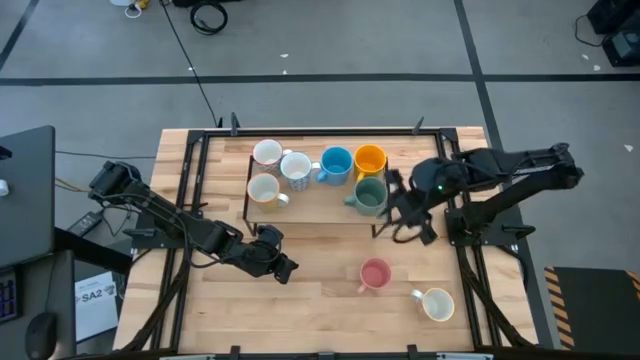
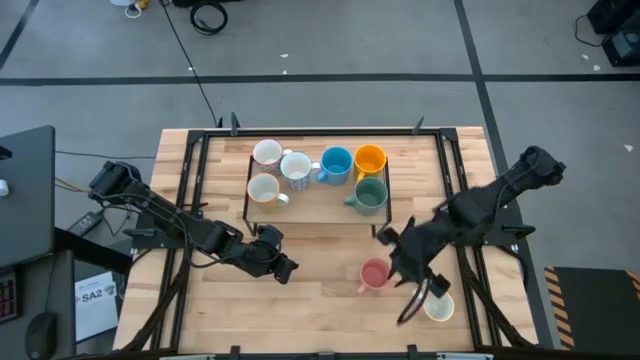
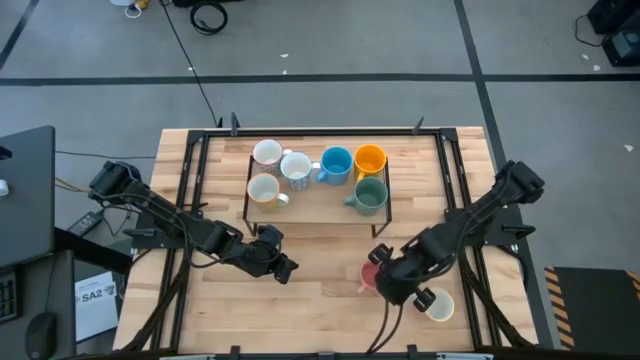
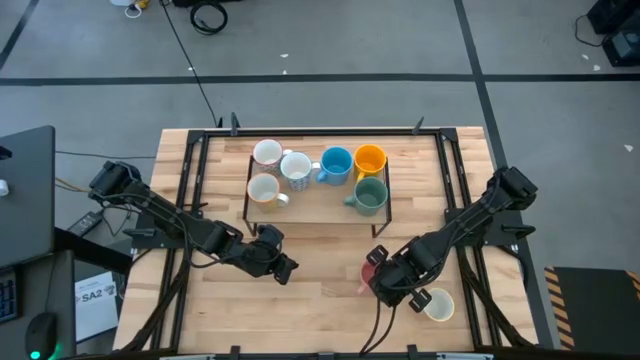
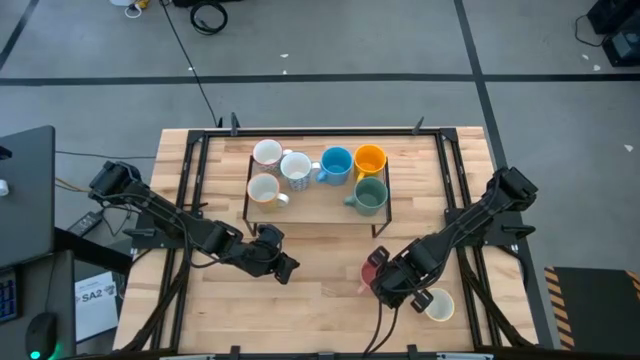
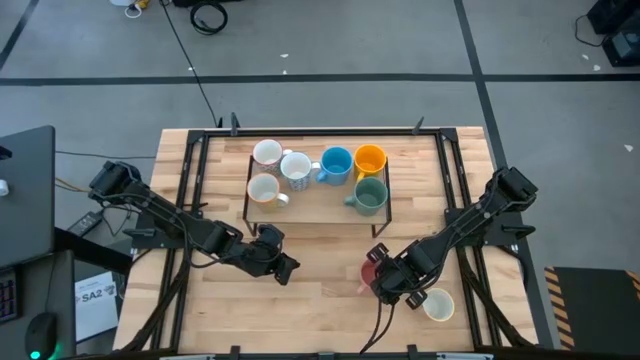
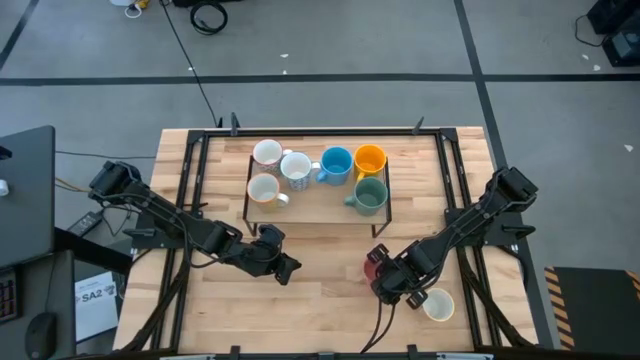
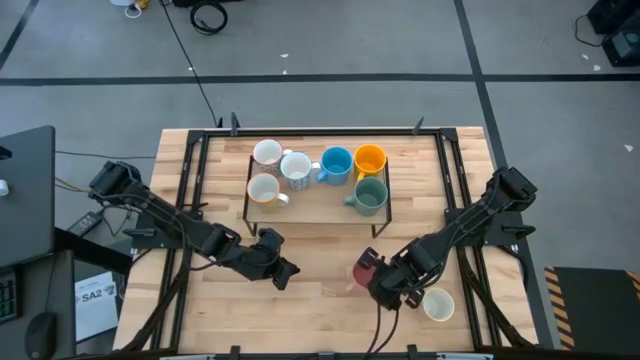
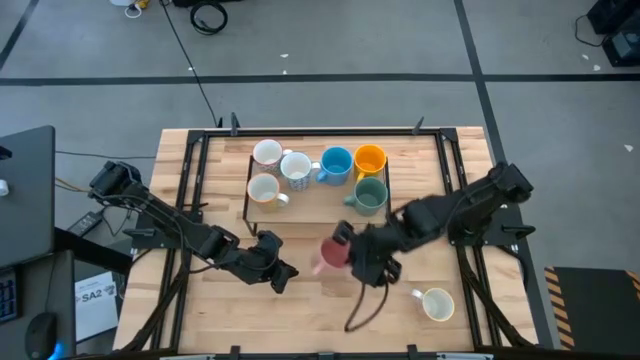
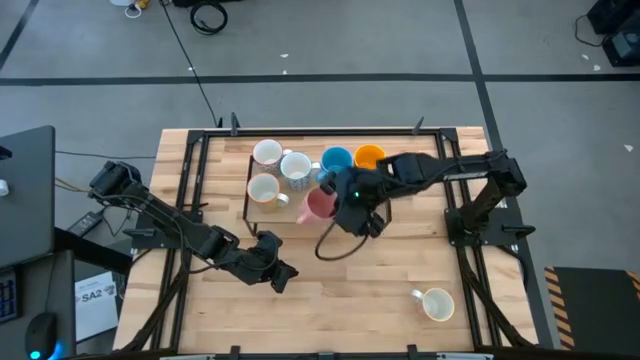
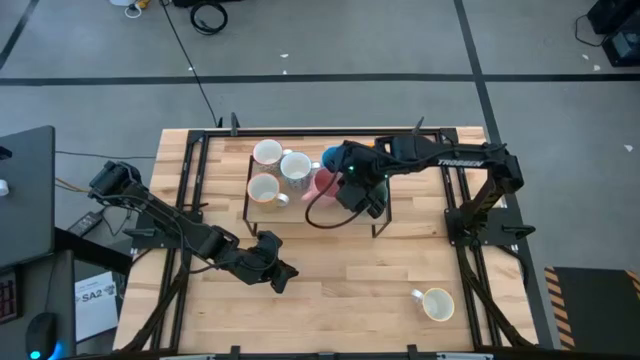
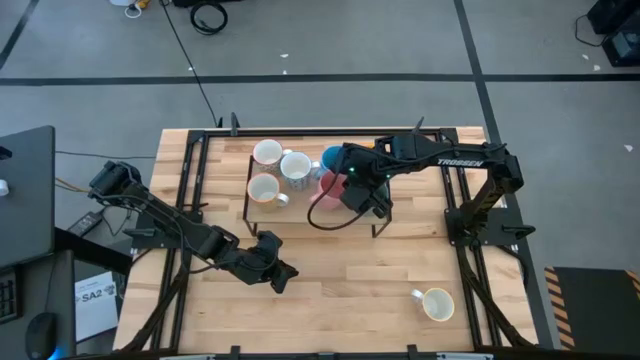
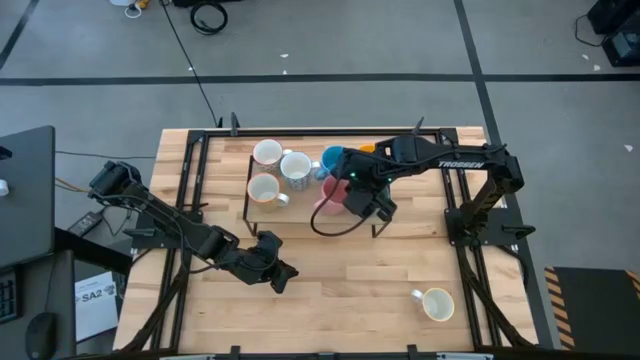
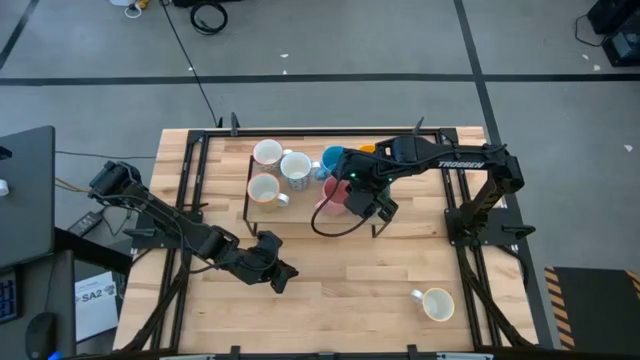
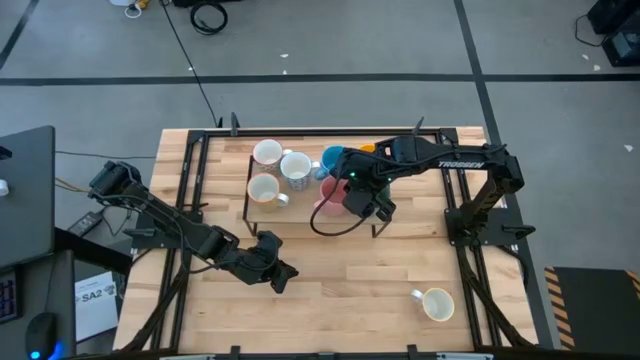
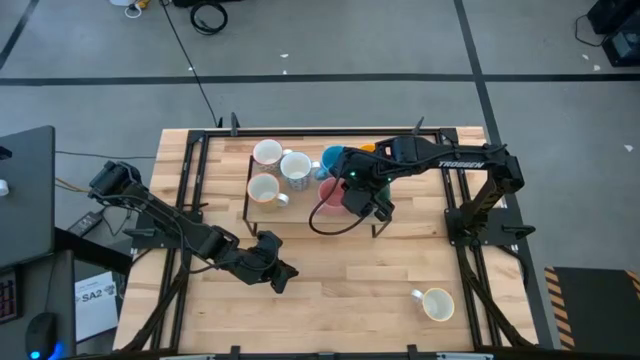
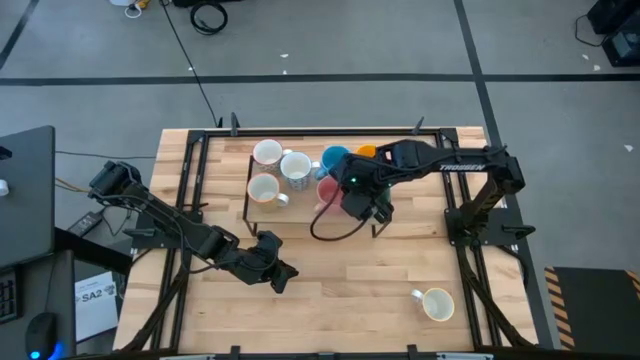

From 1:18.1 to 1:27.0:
Task: Place coffee mugs
Put the pink mug on the shelf

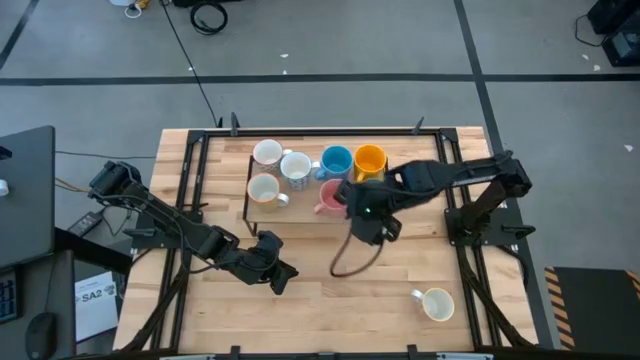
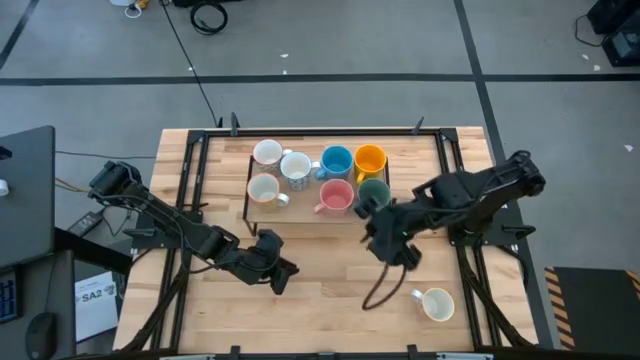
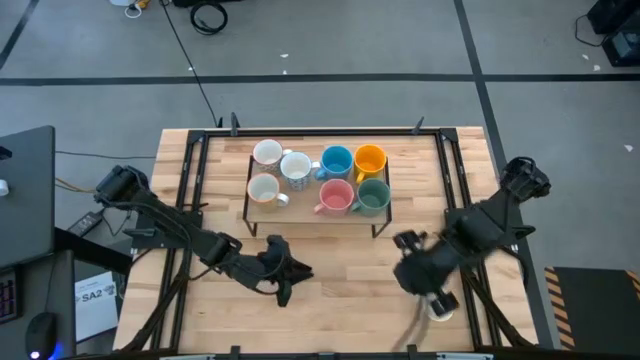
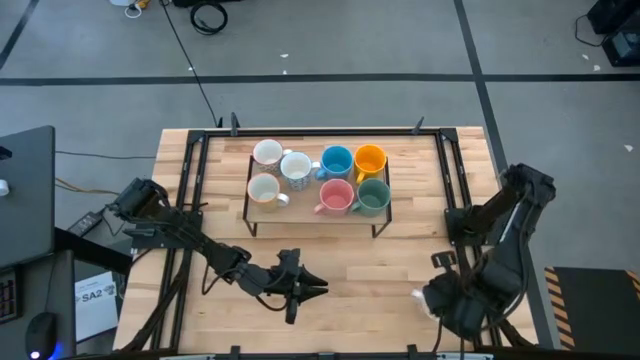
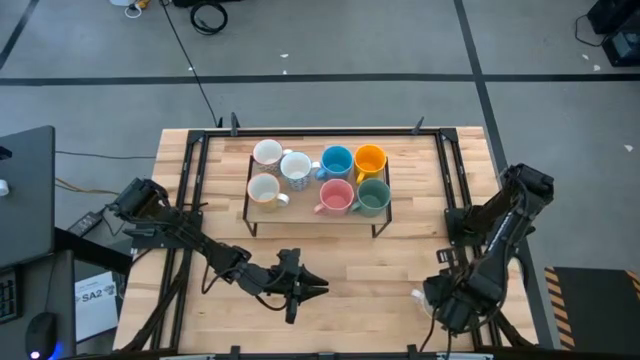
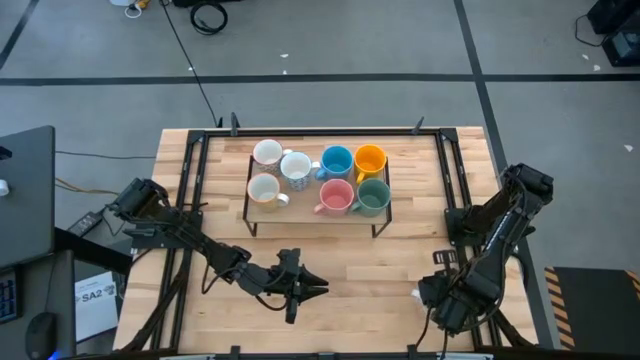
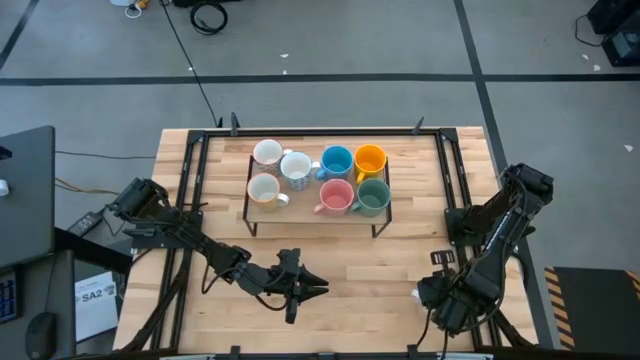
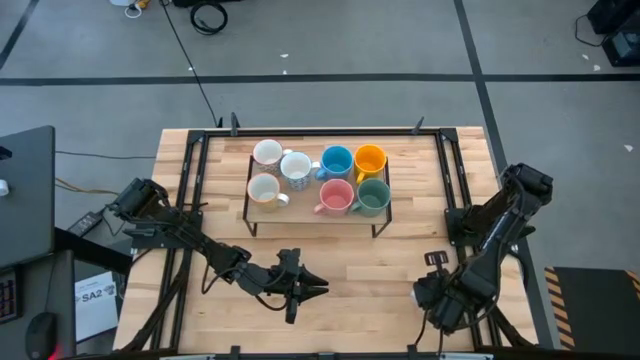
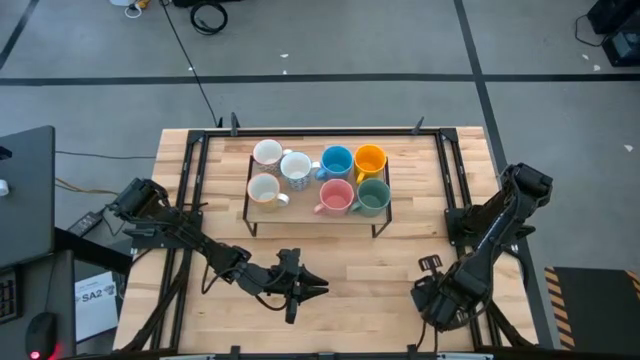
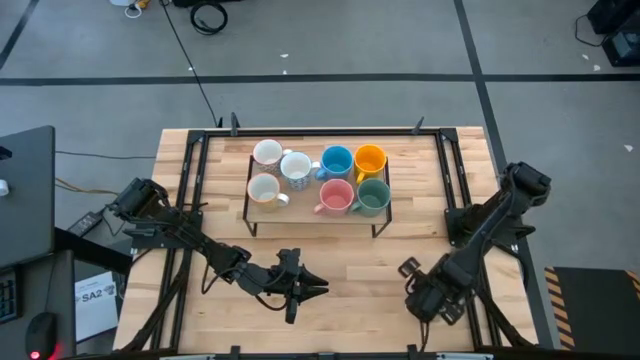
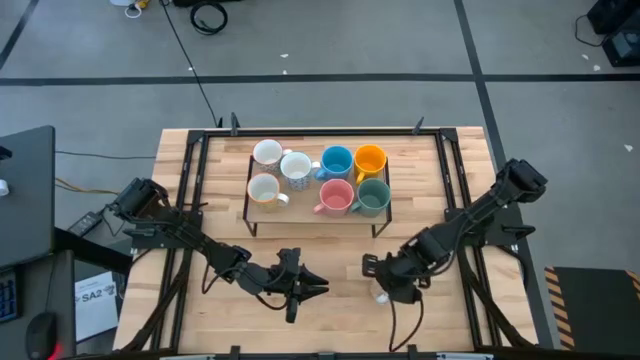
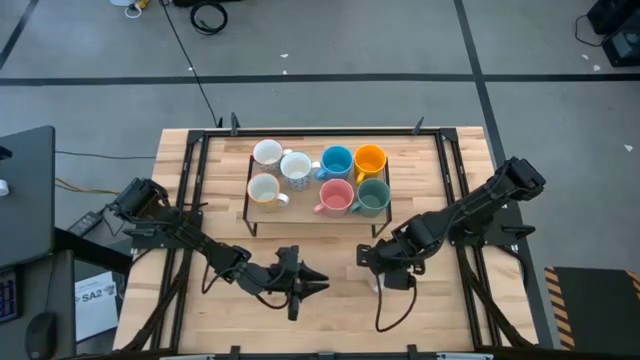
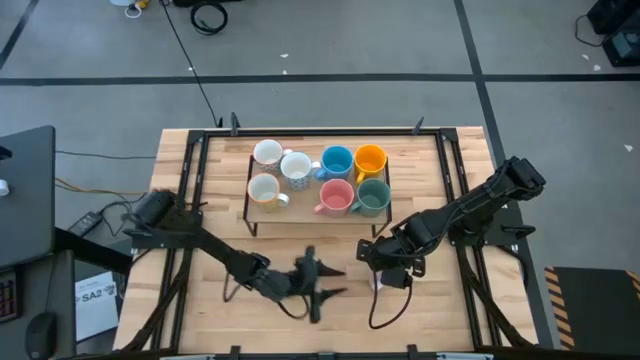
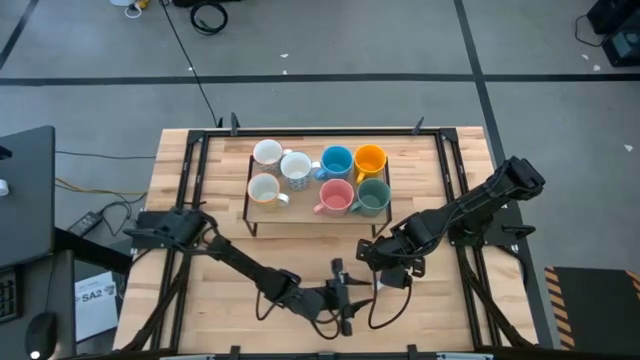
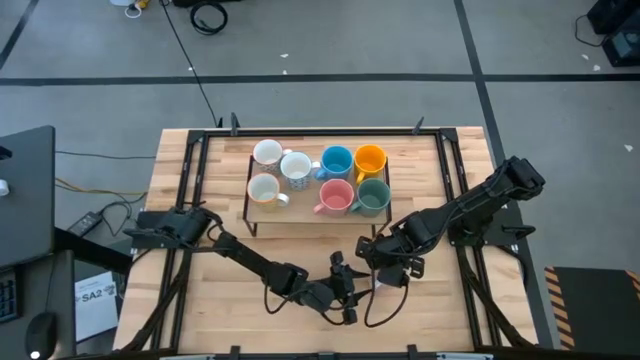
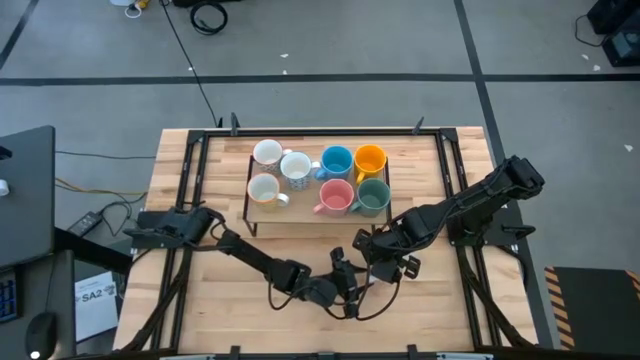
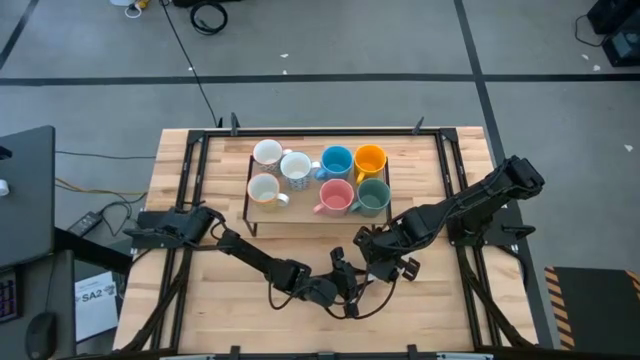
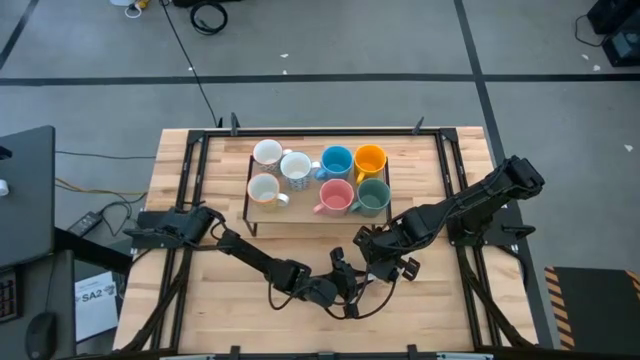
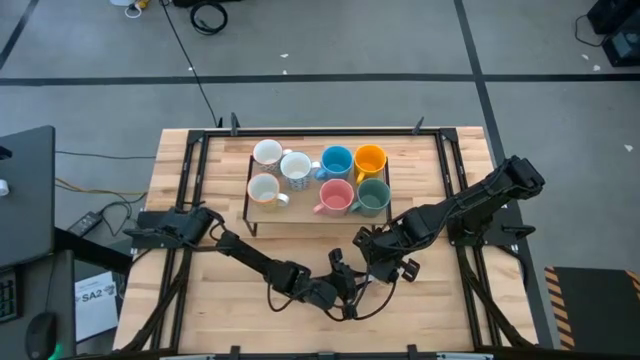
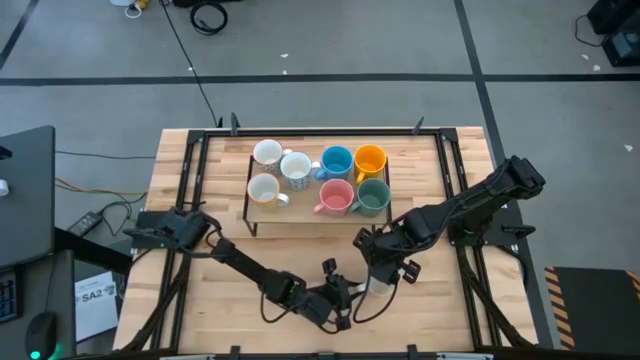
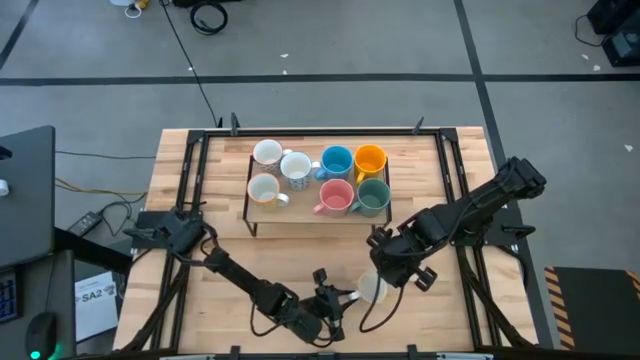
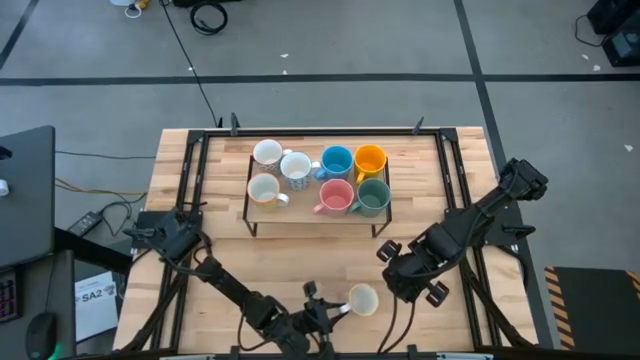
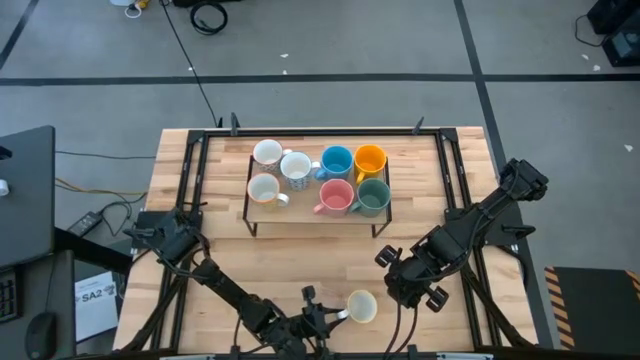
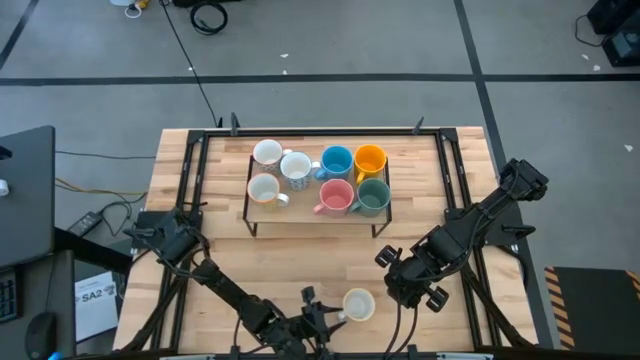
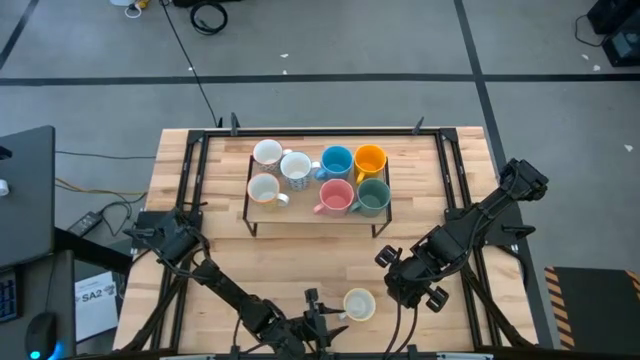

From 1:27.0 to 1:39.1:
Put the orange patterned mug on the shelf
